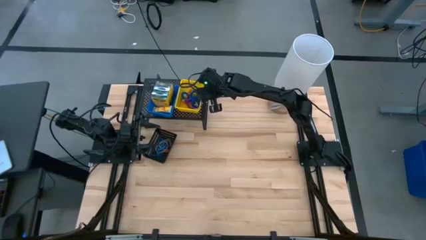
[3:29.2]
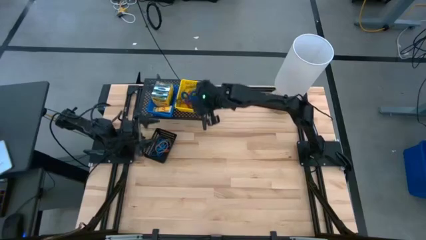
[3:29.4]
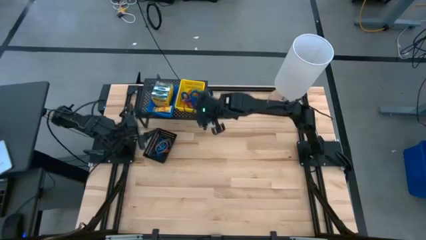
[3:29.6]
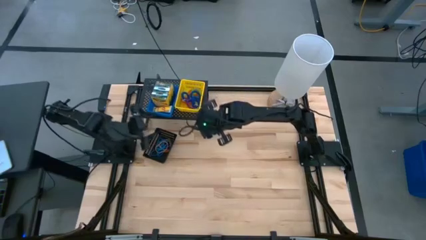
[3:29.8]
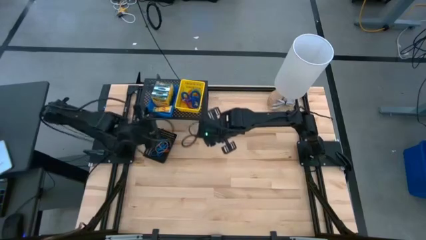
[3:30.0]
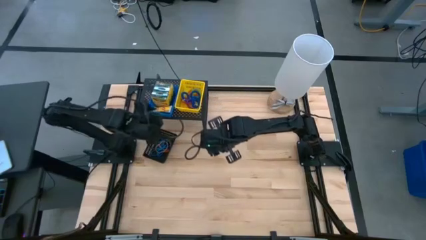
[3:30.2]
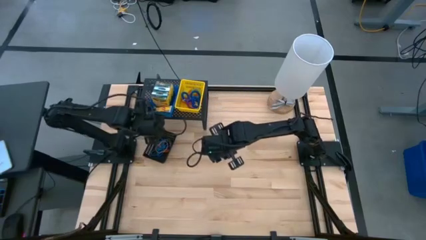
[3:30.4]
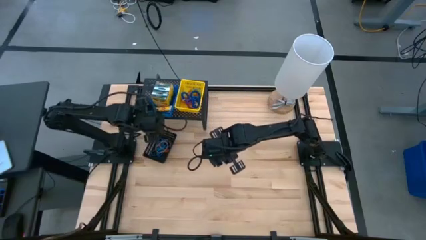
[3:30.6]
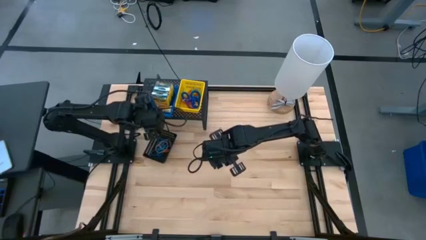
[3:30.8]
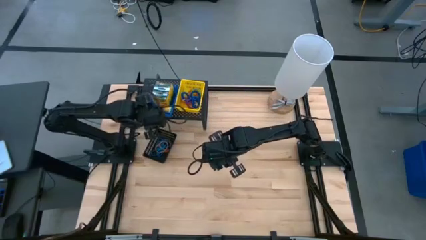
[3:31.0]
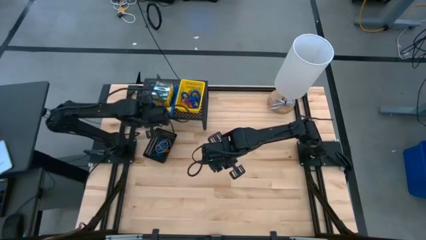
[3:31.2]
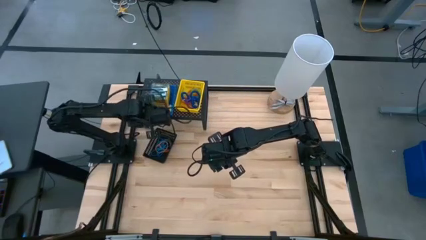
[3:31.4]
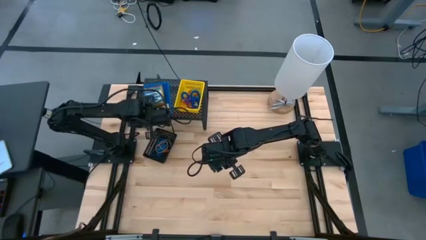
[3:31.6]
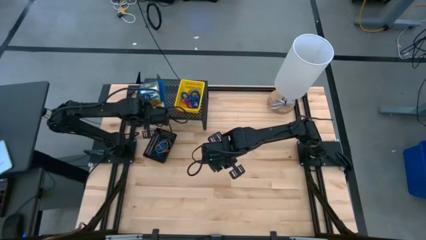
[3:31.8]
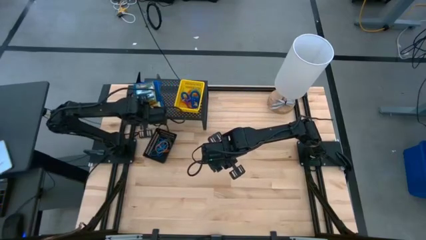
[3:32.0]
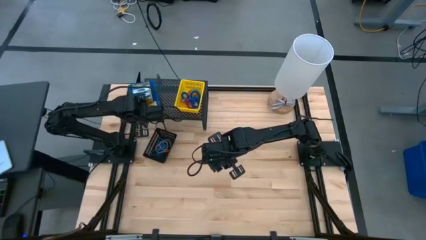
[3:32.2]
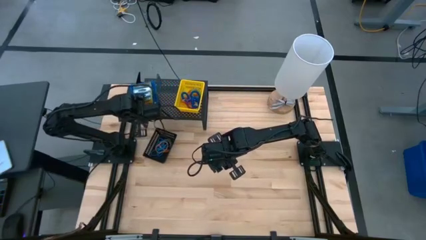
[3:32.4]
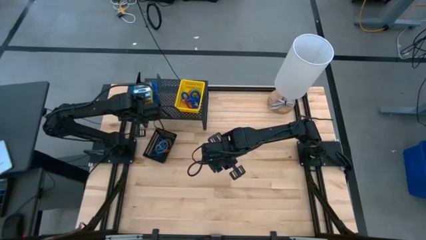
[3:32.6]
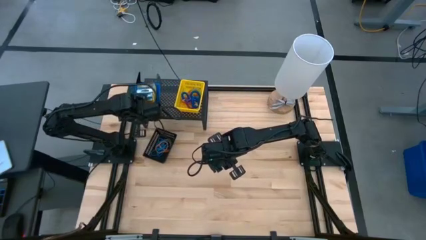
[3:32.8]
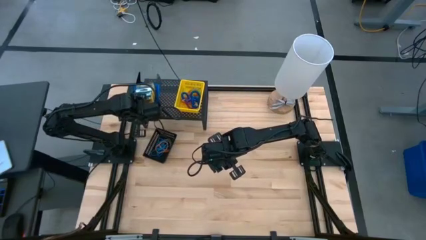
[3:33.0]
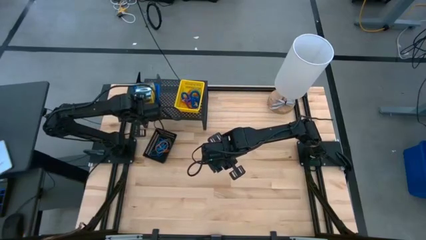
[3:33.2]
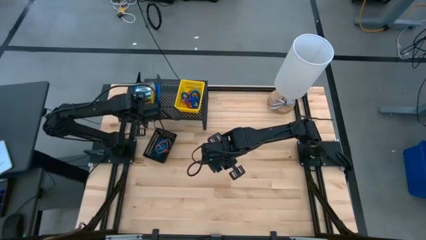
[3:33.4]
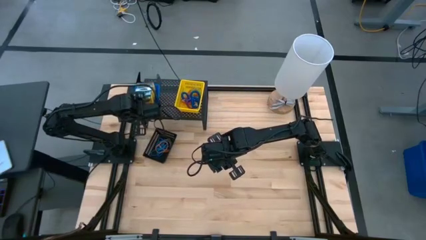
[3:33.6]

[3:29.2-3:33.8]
Task: Pick & Place Office Desk Supplies
Adjust the blue bin on the shelf

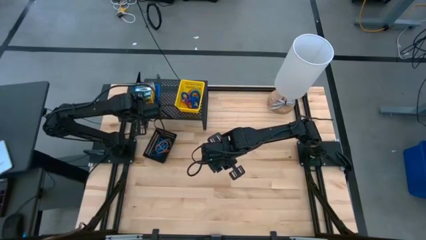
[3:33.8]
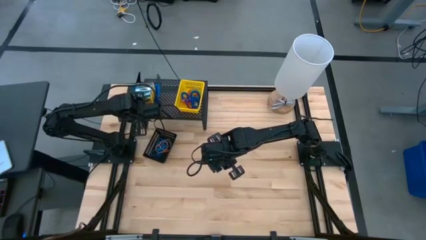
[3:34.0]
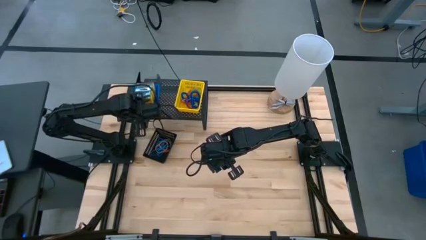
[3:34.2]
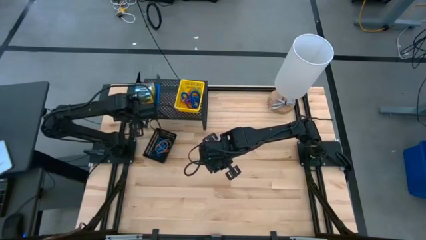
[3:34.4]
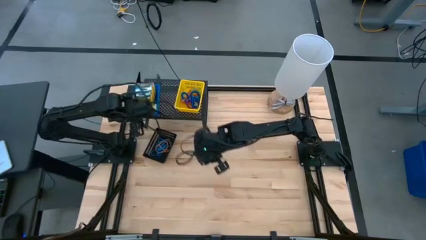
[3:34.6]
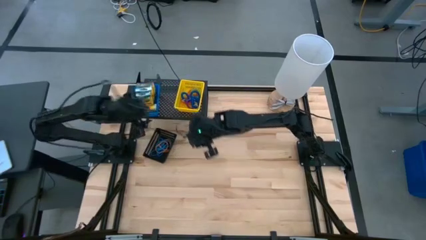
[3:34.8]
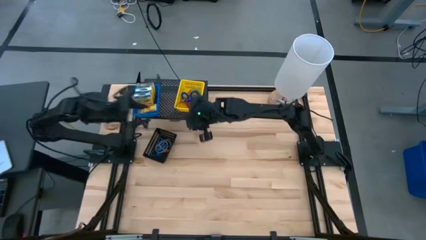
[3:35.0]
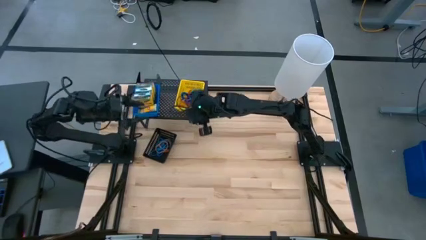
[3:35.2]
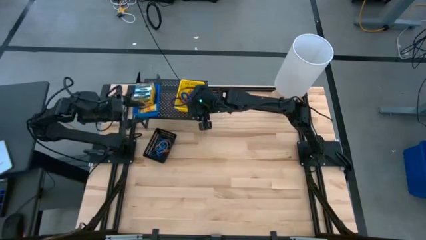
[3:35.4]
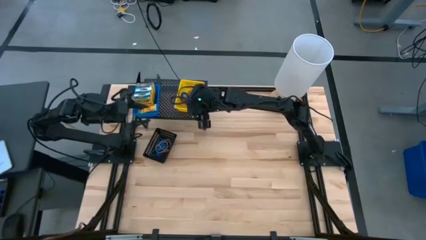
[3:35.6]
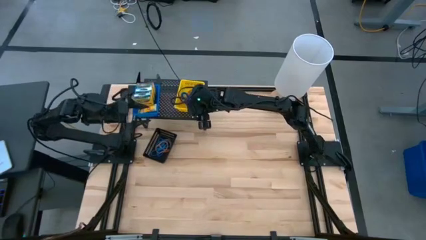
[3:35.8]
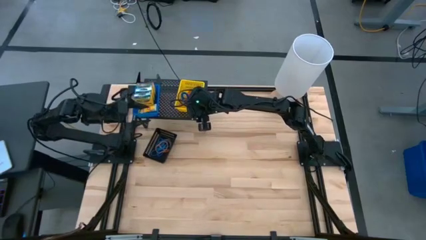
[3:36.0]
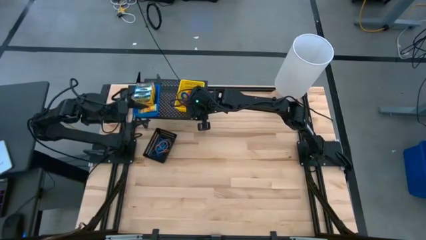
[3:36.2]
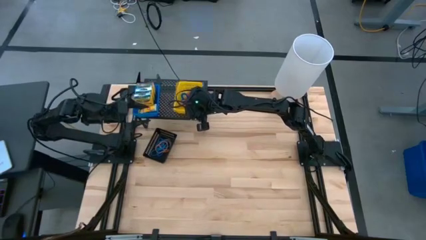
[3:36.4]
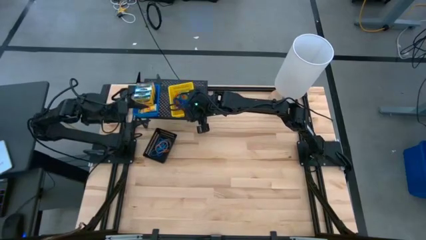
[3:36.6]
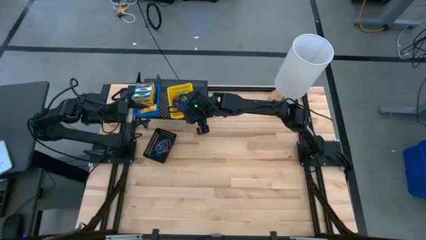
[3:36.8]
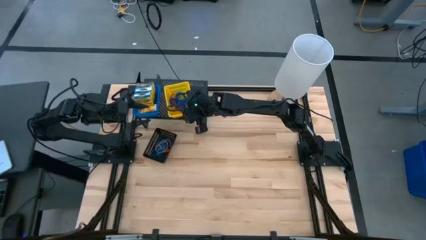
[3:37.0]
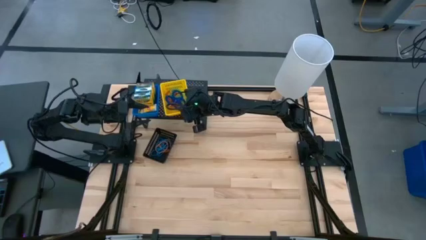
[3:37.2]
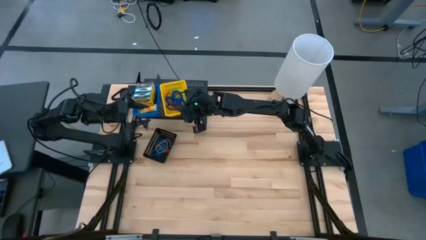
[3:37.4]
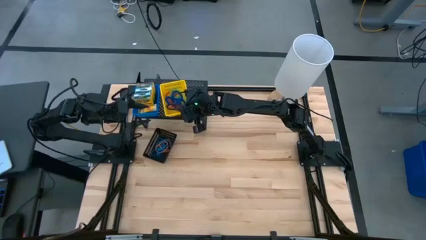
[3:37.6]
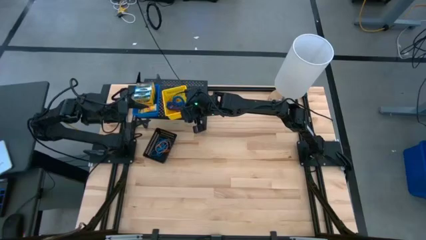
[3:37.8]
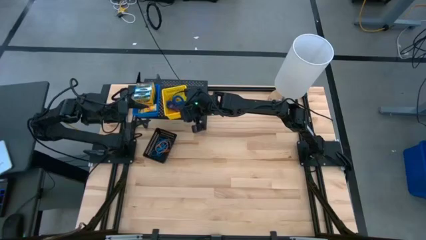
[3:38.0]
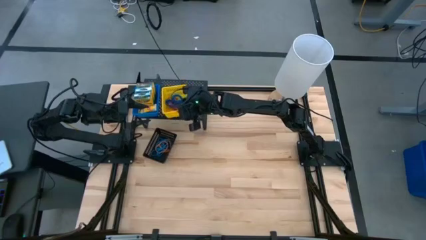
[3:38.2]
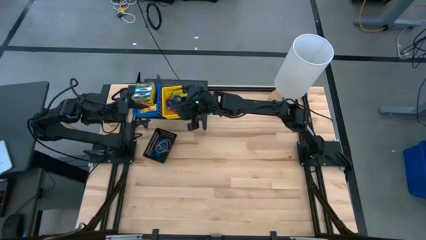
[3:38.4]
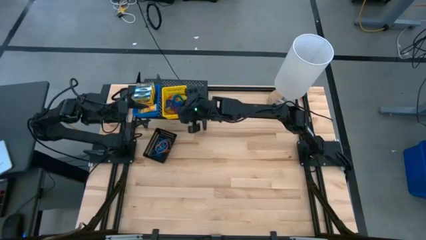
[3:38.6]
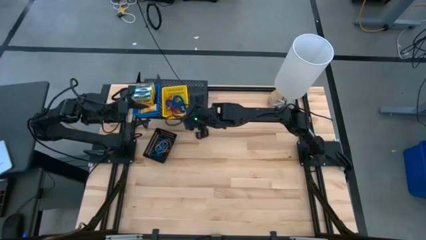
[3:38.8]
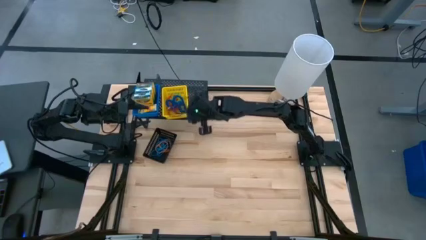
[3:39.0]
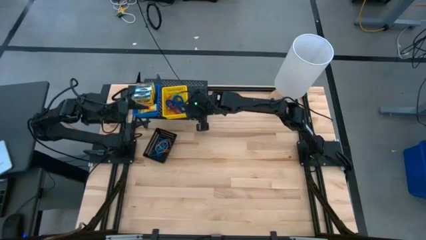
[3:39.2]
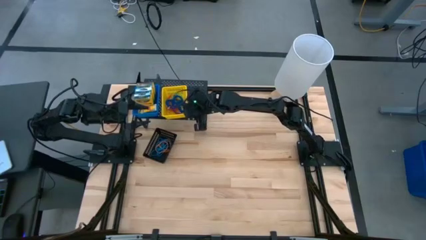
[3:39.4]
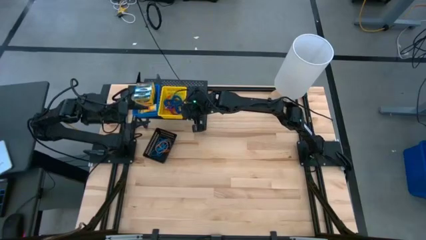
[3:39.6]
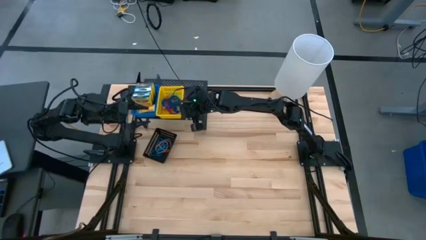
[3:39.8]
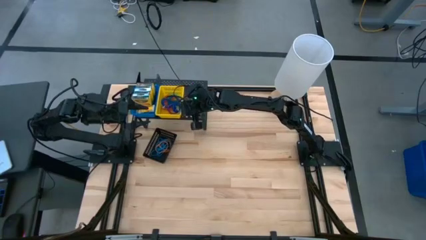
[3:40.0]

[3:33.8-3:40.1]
Adjust the yellow bin on the shelf

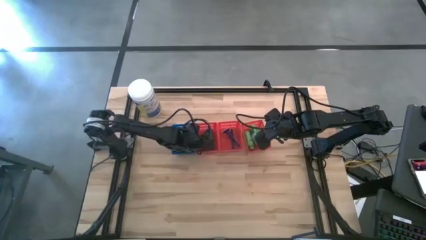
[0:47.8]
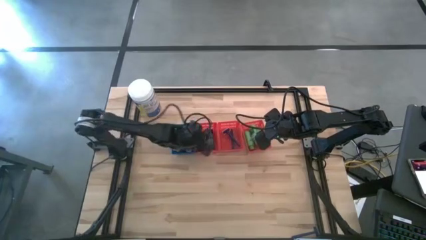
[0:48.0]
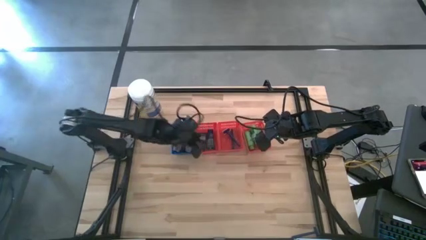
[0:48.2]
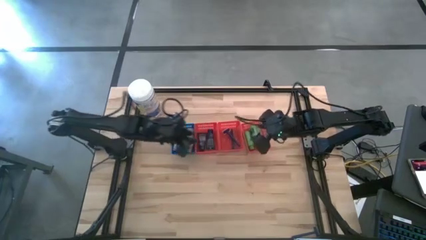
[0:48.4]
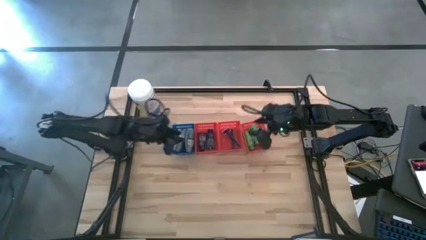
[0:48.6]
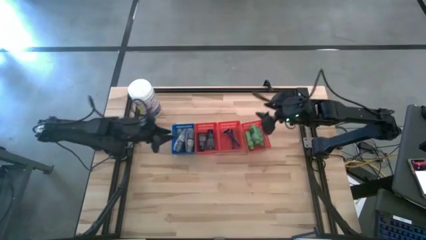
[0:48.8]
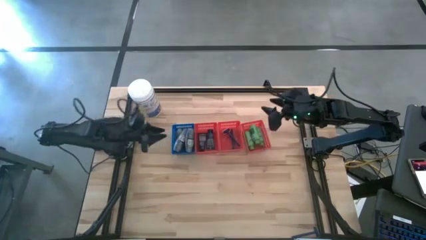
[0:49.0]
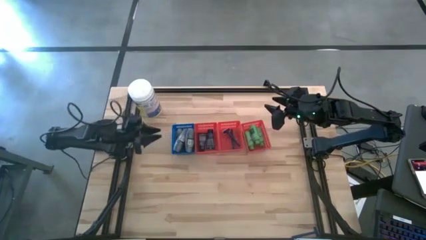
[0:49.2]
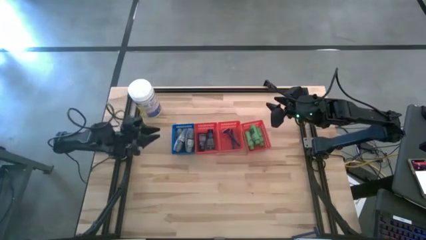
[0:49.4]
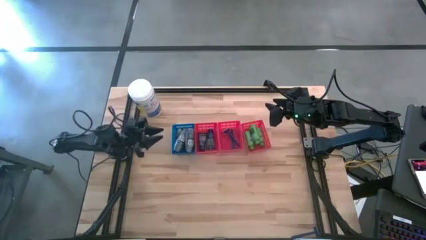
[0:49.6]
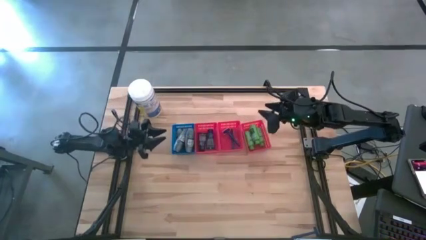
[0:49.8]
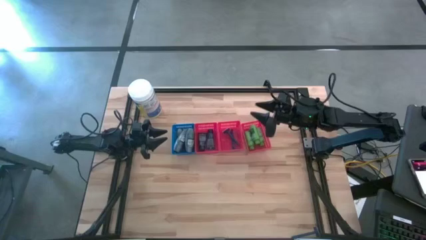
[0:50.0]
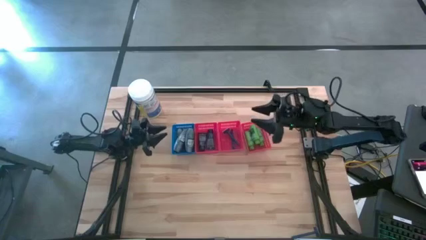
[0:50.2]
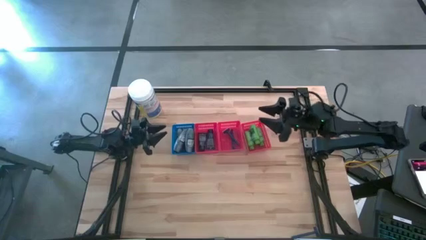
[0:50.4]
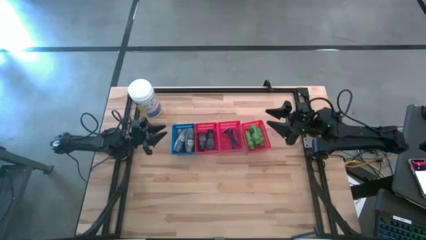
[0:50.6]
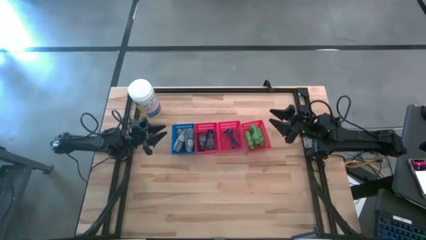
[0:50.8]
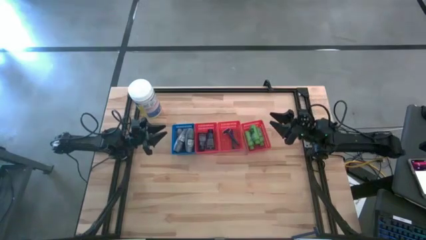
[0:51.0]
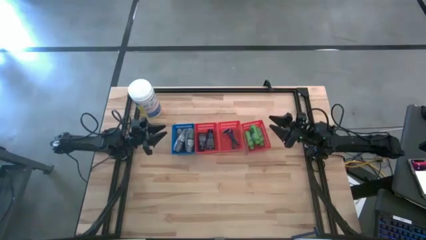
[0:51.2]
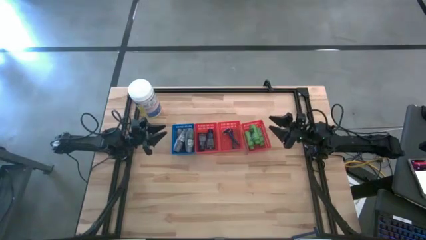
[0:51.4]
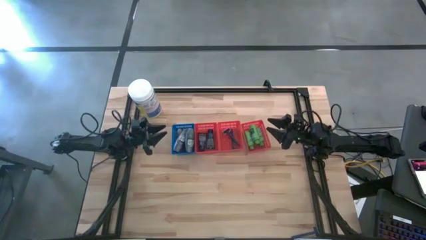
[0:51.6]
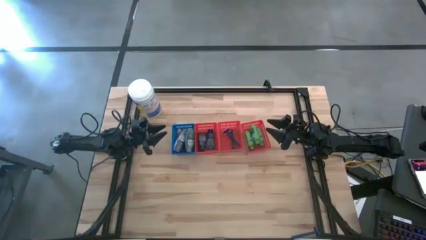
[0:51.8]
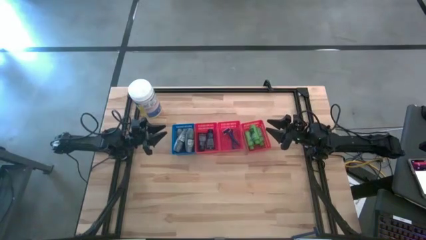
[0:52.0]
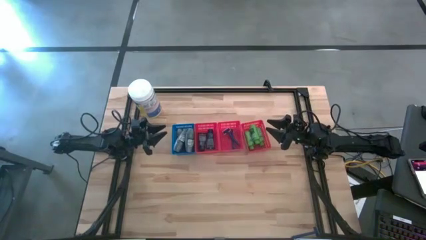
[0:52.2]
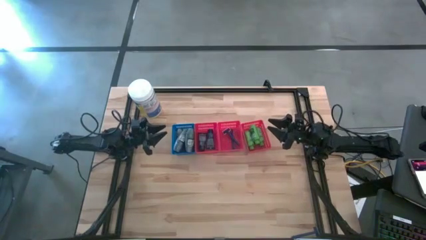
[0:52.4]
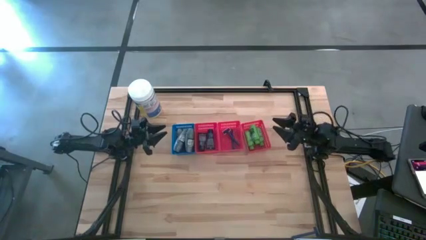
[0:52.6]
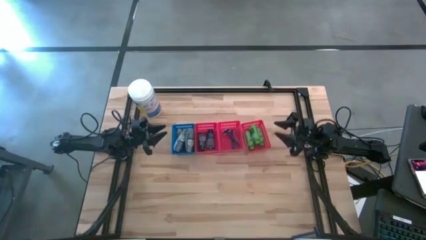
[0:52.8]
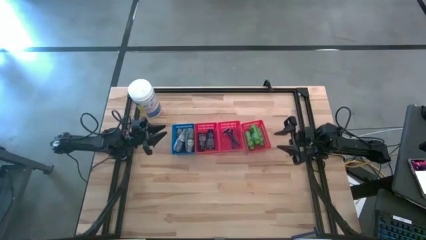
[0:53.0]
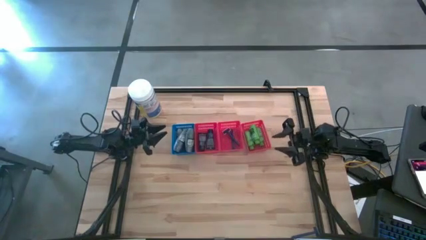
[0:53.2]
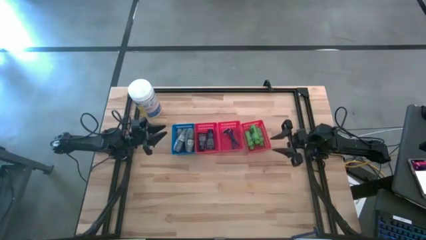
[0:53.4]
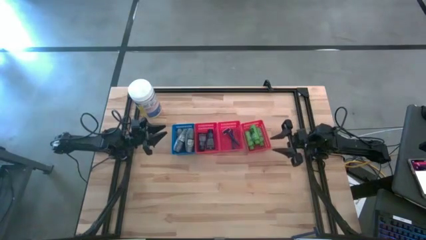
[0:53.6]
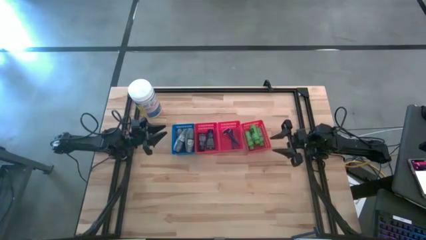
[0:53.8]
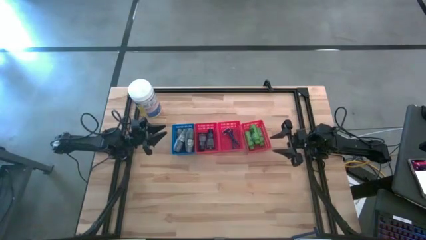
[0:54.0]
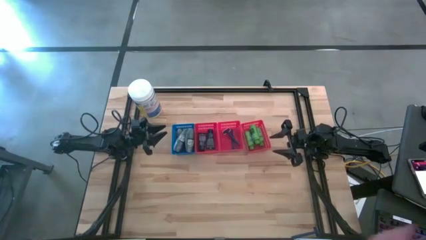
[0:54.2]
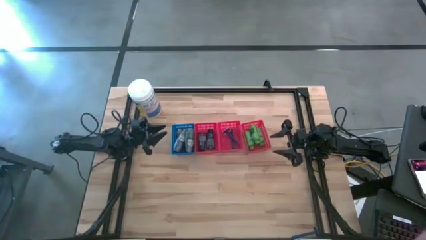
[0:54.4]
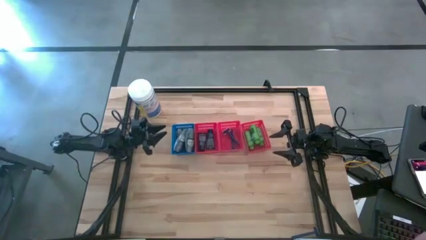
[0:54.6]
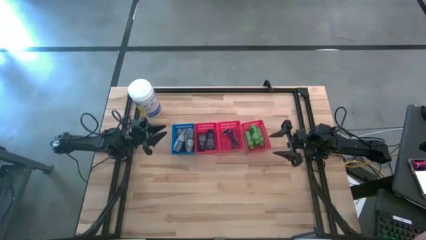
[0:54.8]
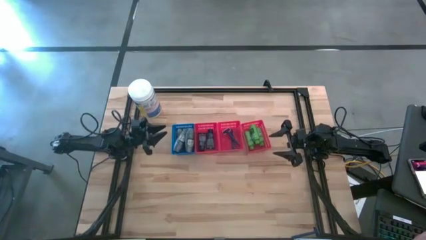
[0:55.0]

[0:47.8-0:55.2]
Task: Pick & Place Travel size toiletries
Return to home position
